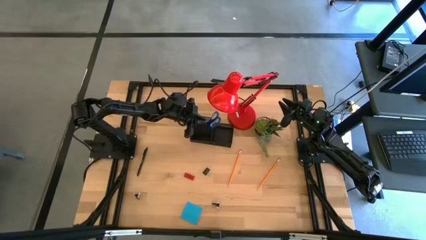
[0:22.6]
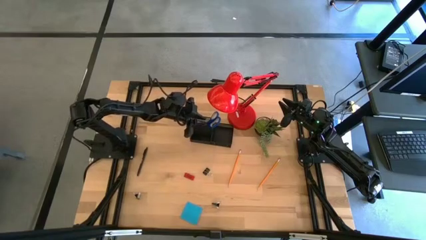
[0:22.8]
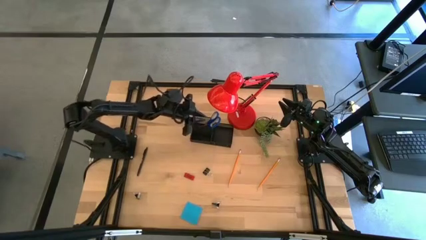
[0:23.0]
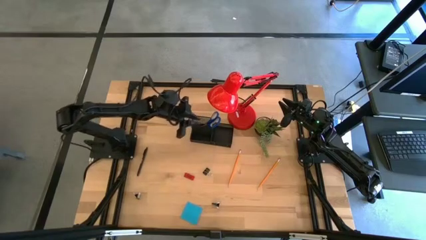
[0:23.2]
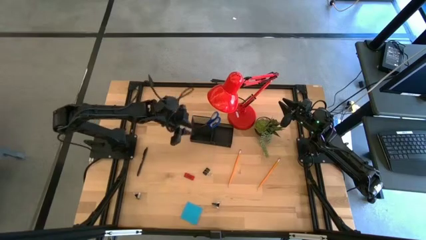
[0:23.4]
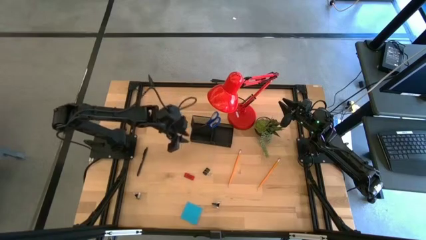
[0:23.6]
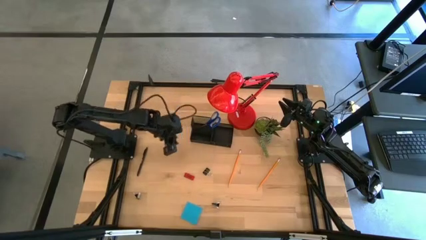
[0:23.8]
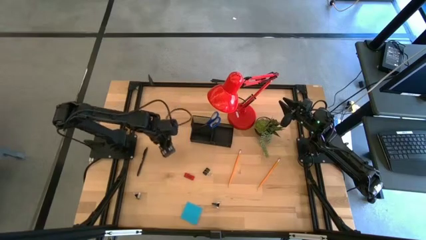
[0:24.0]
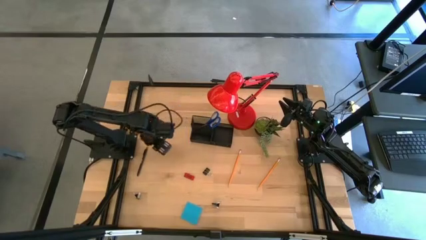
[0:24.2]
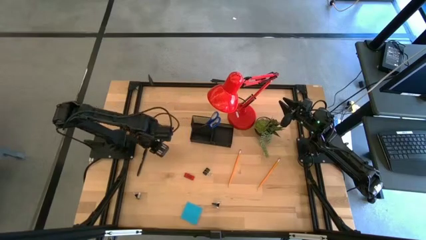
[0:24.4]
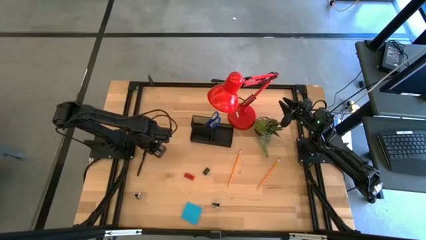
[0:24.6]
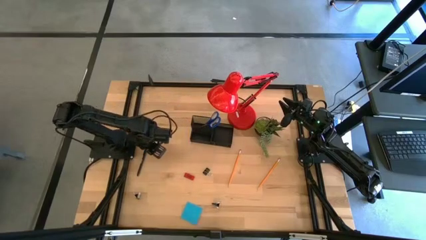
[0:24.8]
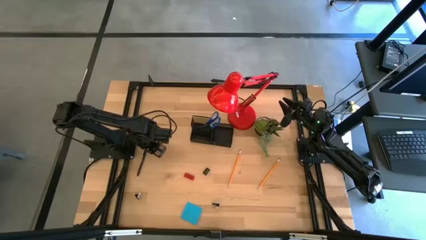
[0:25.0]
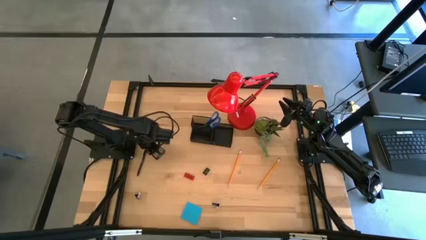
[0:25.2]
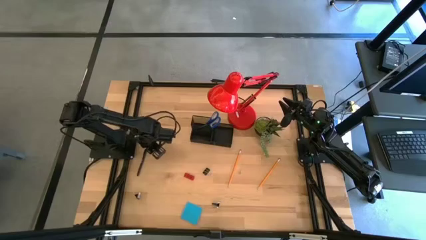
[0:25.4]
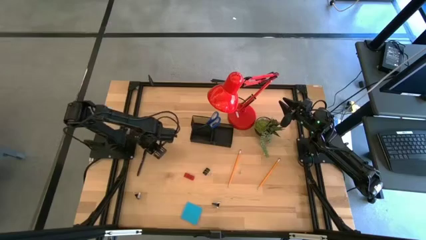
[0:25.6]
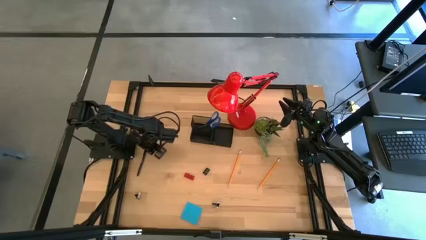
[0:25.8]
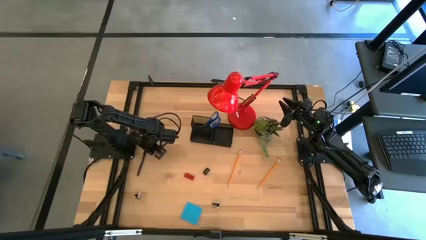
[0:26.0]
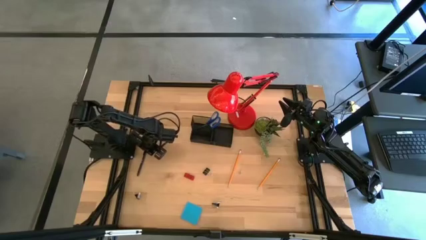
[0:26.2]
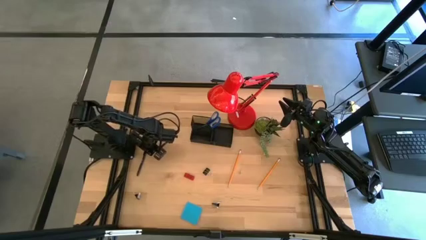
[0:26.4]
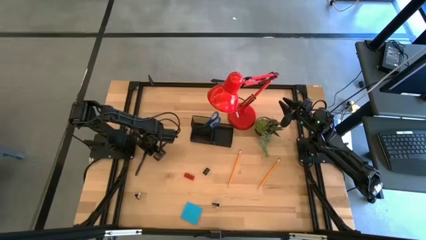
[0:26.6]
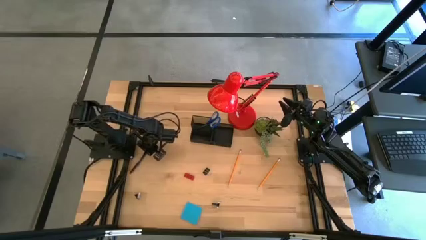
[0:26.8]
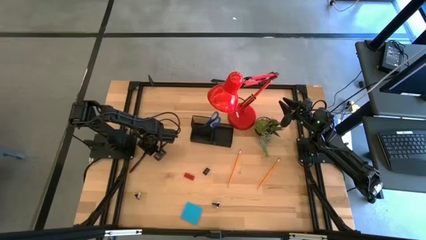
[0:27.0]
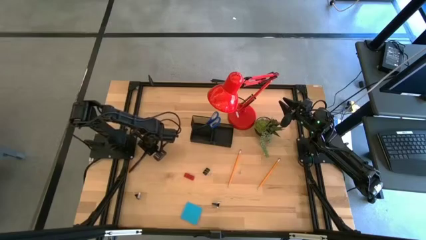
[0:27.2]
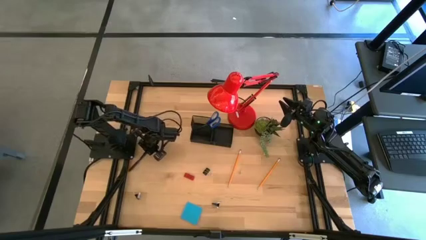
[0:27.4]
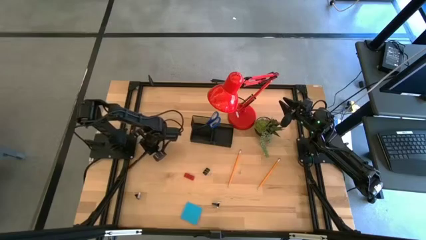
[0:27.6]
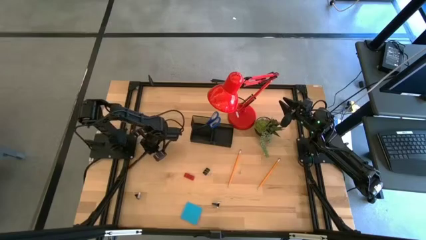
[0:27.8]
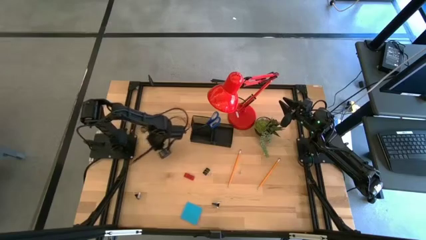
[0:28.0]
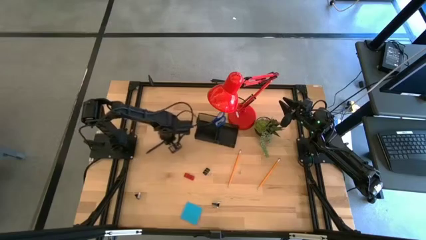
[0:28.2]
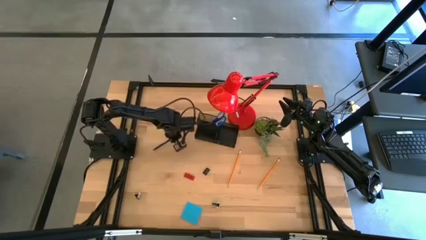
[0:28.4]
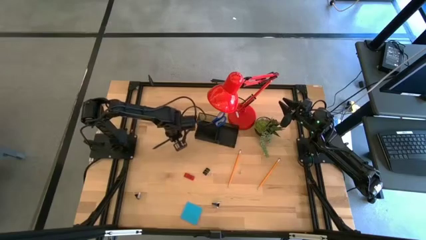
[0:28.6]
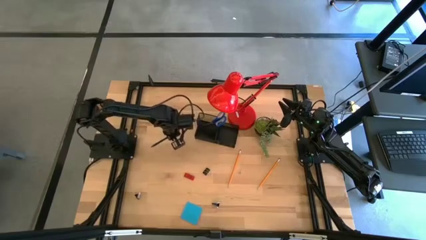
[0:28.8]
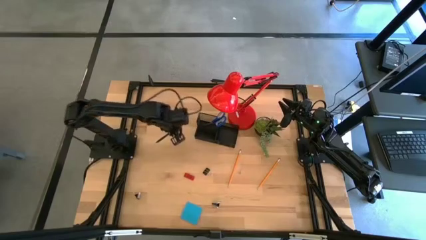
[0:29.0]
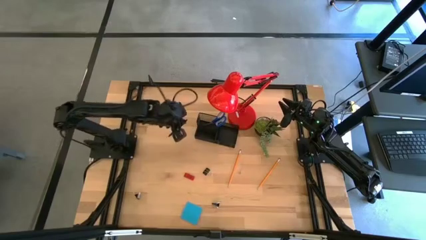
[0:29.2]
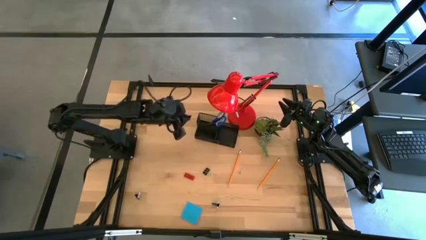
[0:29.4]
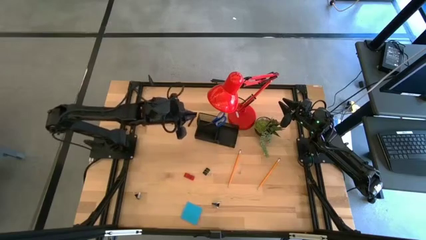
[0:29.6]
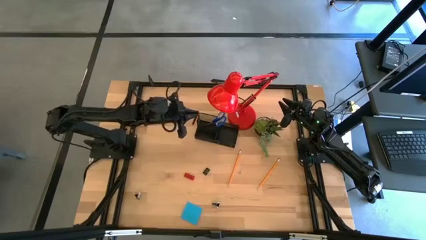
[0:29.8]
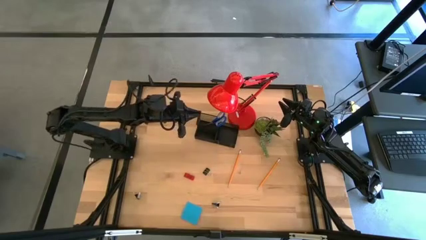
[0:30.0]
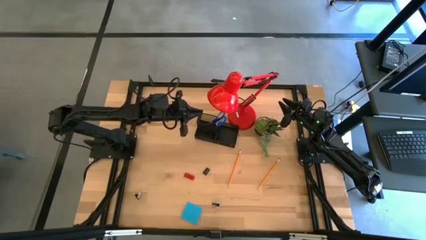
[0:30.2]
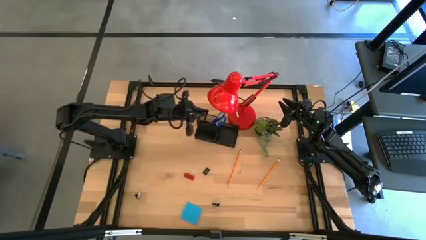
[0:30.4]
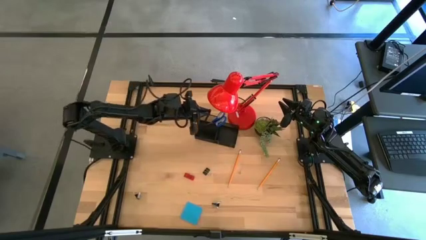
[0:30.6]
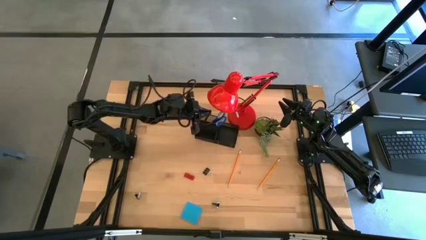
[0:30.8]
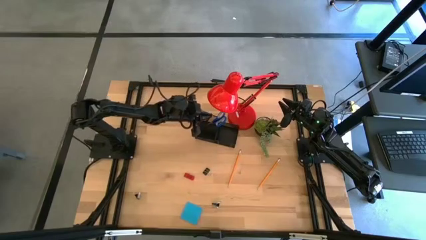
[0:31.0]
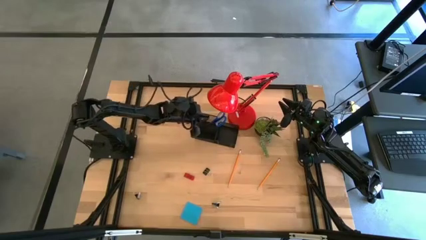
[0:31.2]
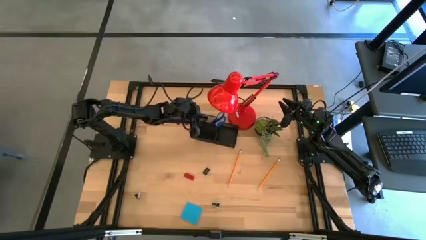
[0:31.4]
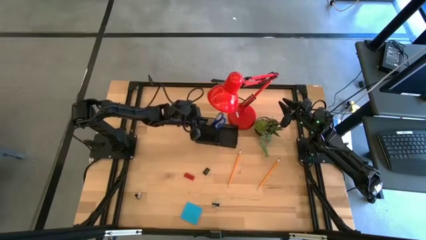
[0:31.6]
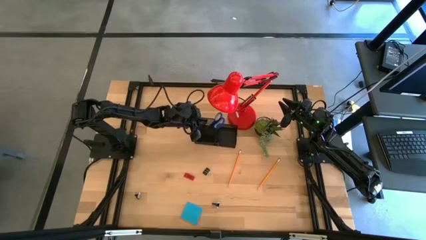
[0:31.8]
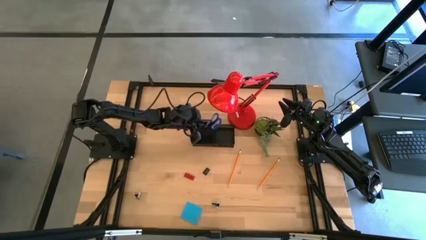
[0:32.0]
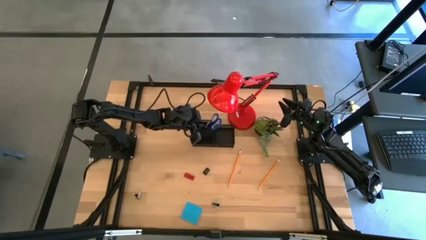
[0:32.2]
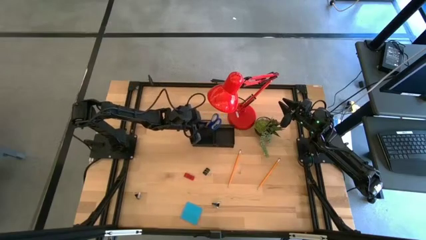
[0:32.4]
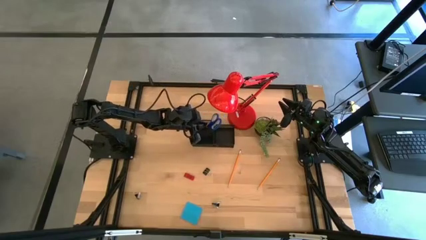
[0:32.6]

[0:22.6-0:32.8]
Task: Pick and place office supplies into organizer
Put the black pen into the black desk organizer

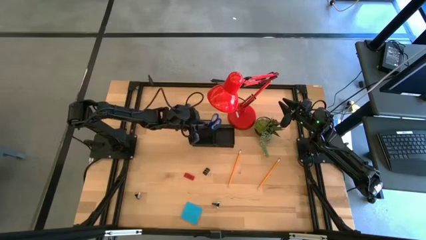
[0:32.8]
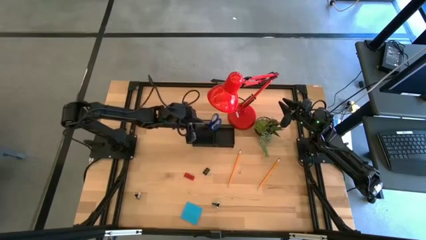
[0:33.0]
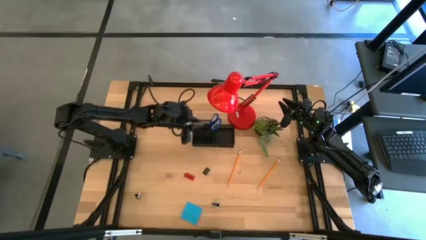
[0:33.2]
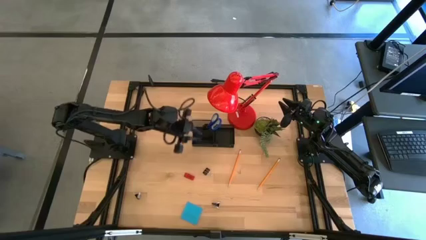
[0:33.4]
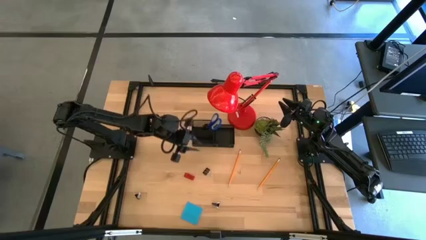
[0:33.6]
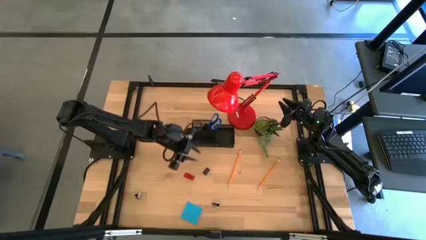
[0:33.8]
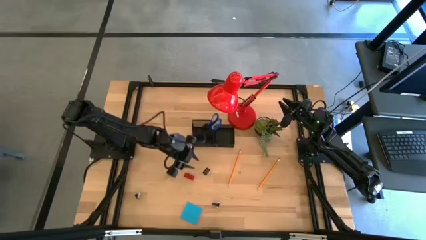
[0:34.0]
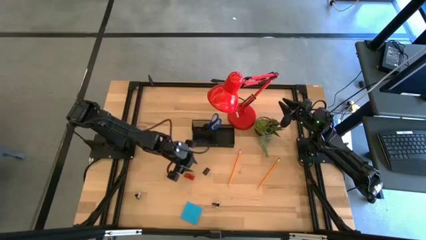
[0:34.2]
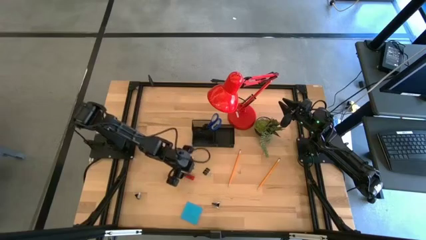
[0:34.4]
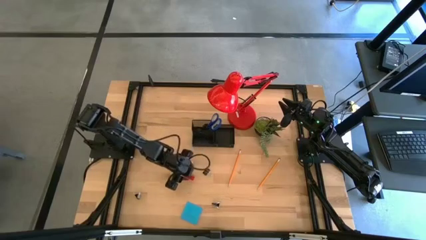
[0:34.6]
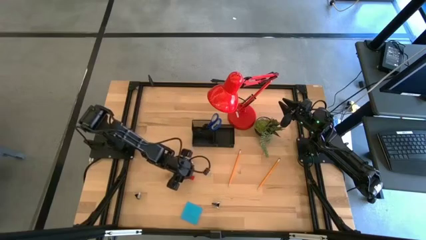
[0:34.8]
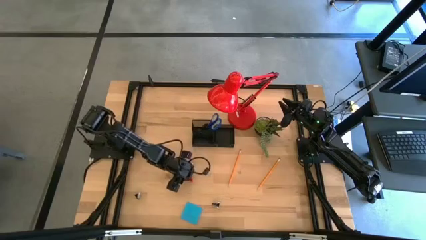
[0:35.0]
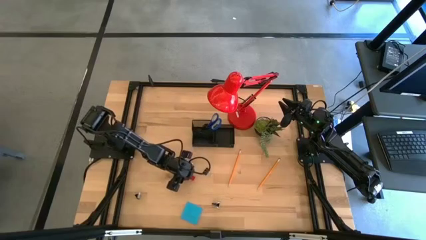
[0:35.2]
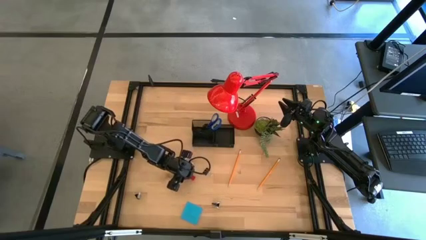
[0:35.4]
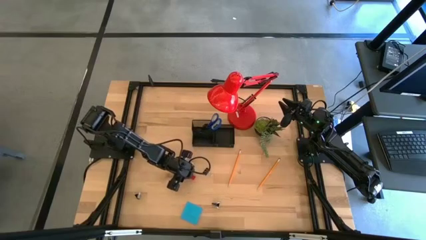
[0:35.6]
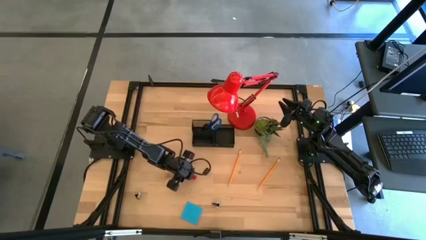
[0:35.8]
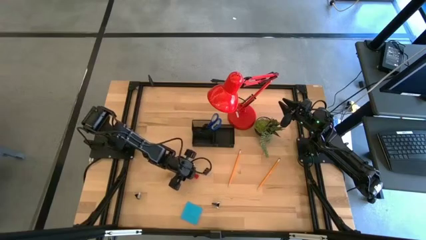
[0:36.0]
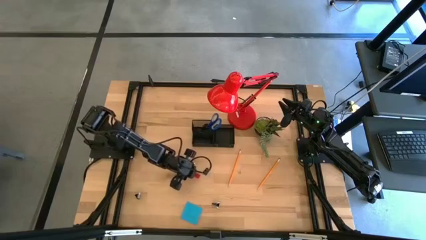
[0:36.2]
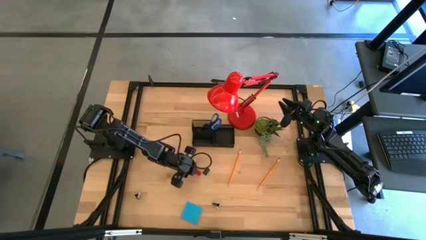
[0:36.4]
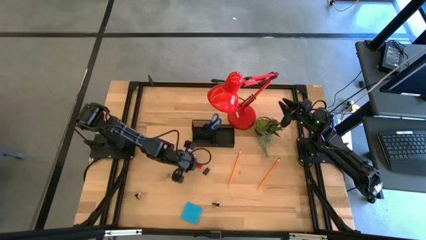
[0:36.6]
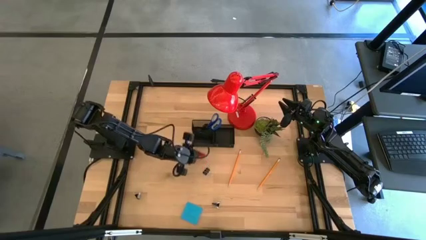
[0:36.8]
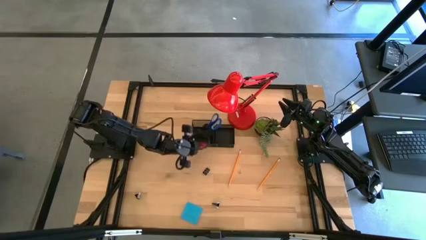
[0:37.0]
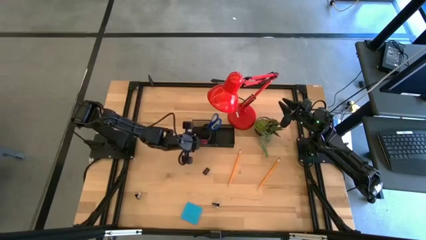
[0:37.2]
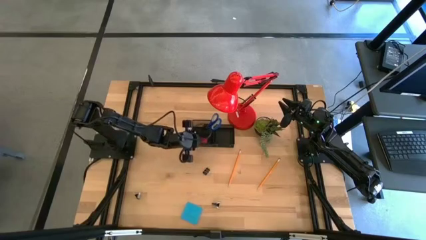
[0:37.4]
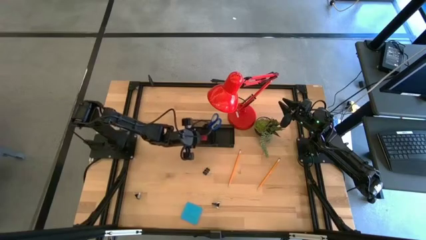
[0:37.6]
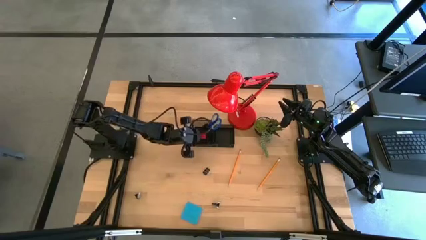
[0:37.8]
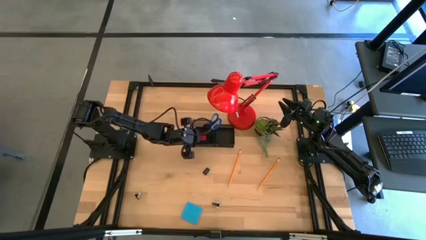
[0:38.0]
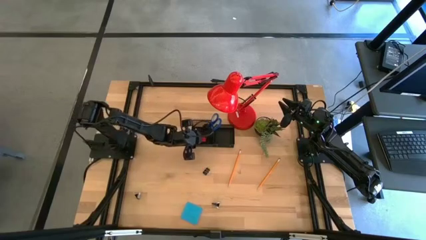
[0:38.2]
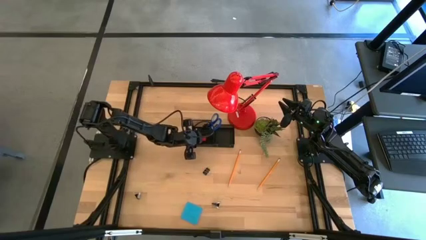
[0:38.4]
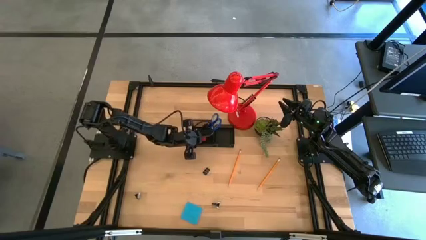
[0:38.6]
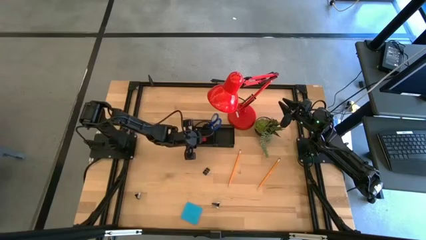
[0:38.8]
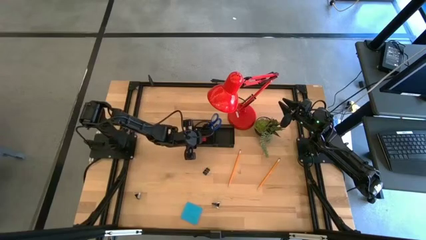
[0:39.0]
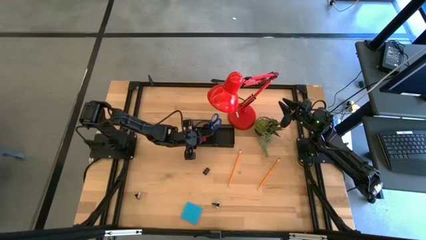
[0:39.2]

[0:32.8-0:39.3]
Put the red eraser into the black desk organizer
